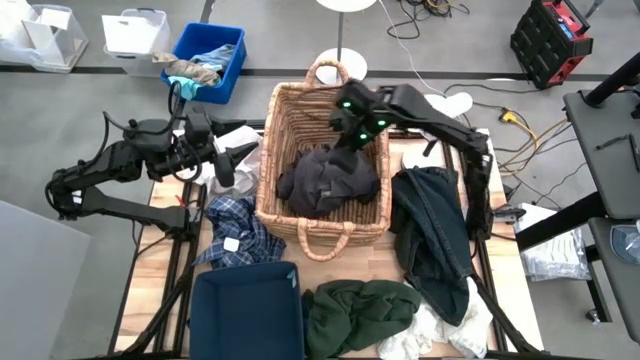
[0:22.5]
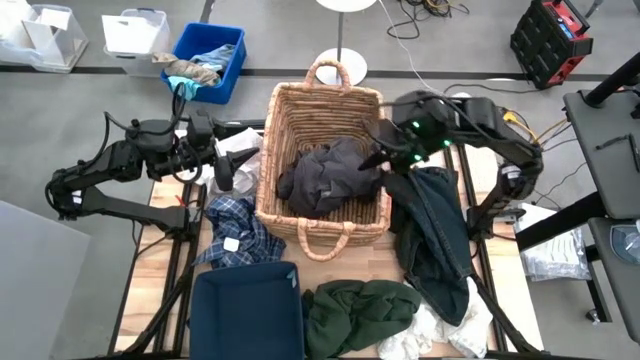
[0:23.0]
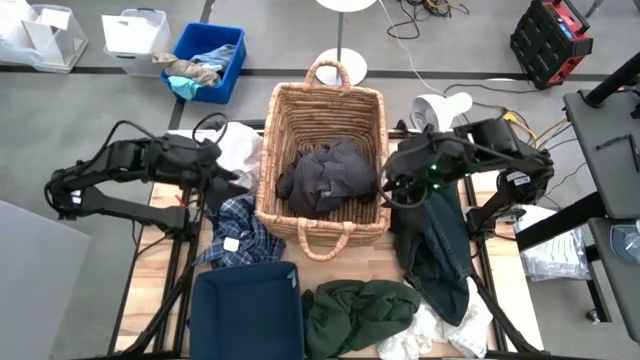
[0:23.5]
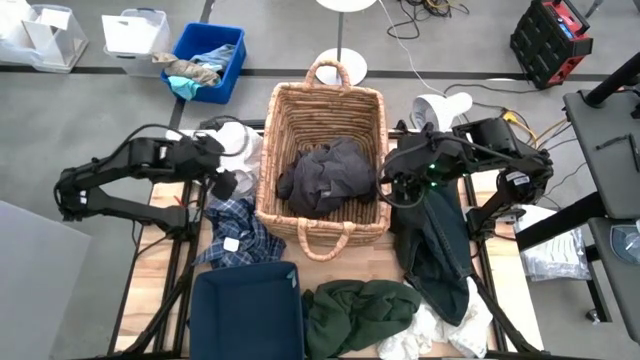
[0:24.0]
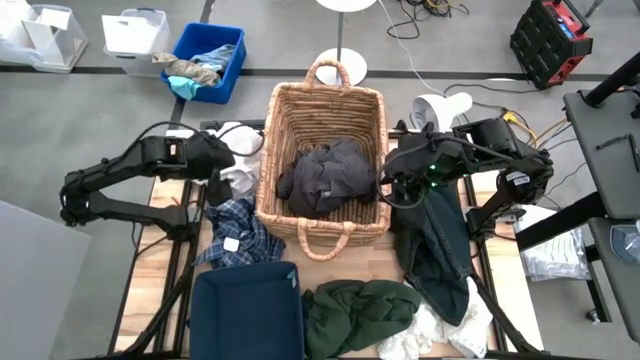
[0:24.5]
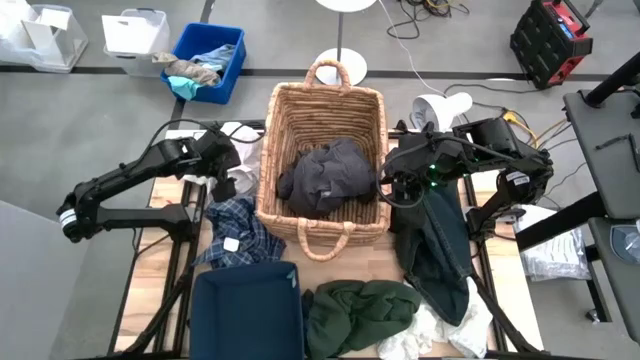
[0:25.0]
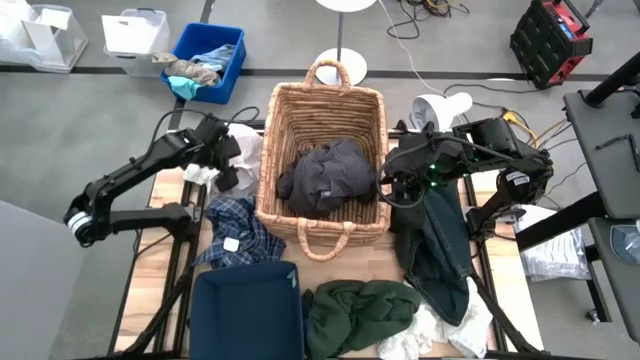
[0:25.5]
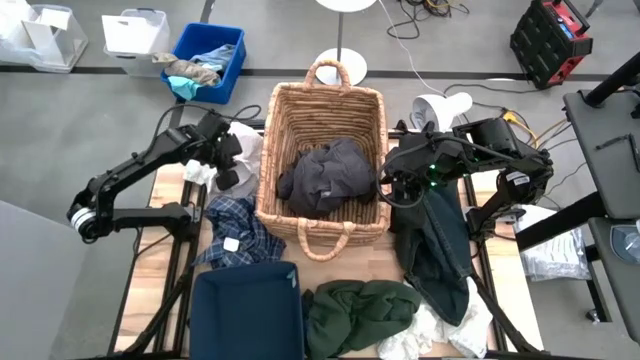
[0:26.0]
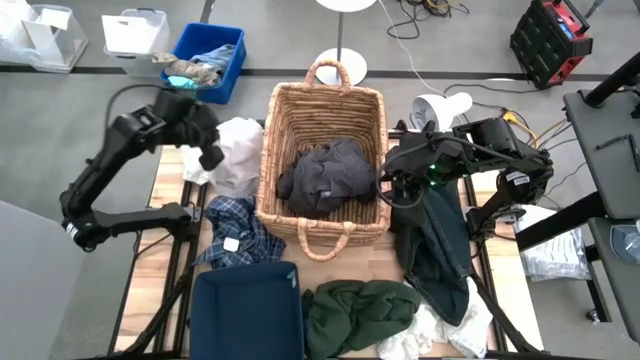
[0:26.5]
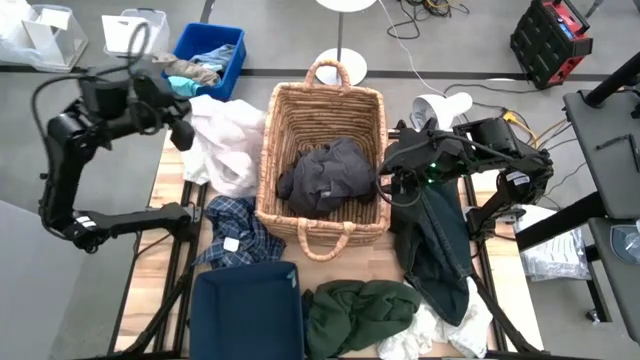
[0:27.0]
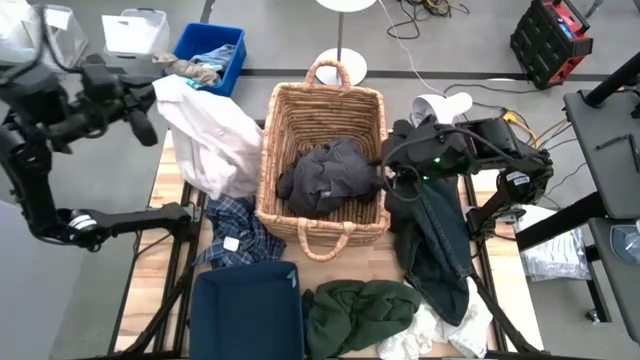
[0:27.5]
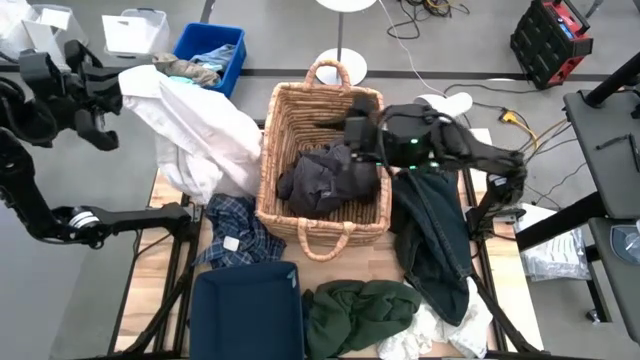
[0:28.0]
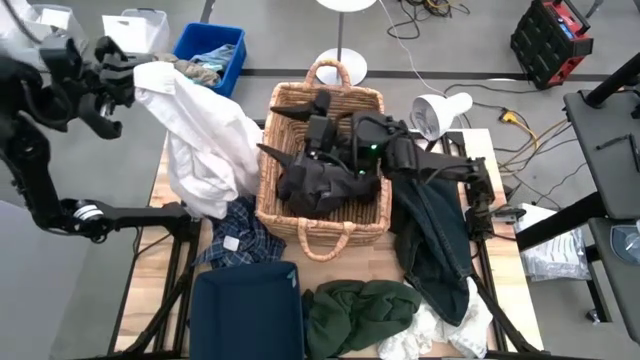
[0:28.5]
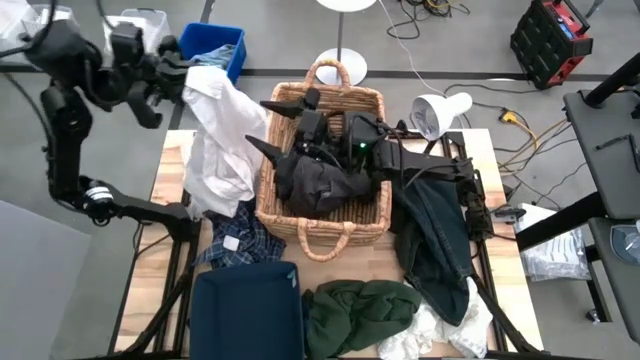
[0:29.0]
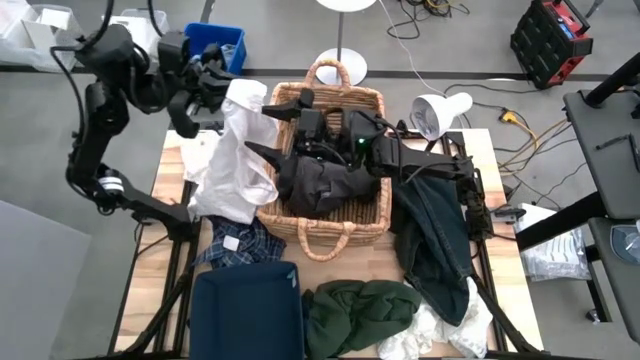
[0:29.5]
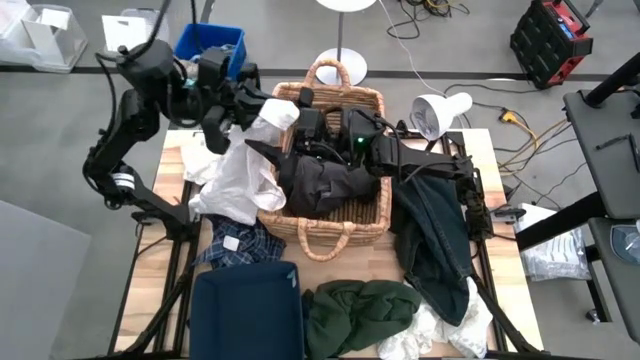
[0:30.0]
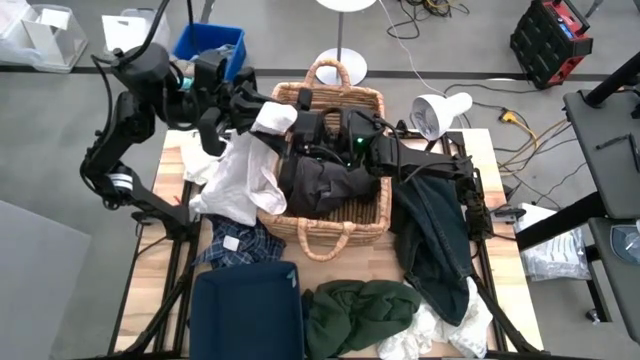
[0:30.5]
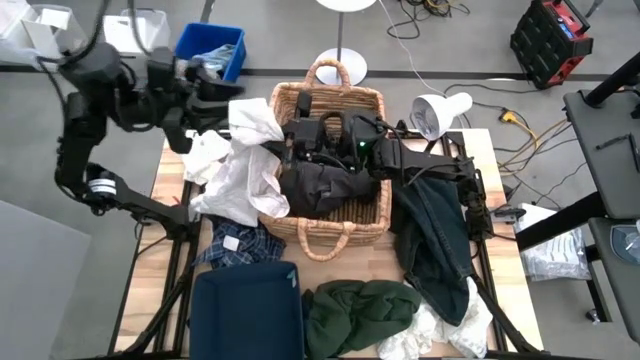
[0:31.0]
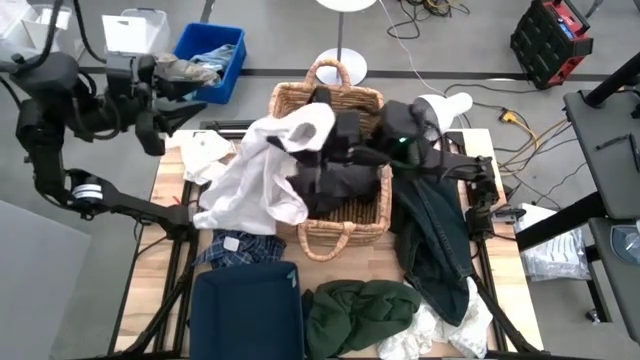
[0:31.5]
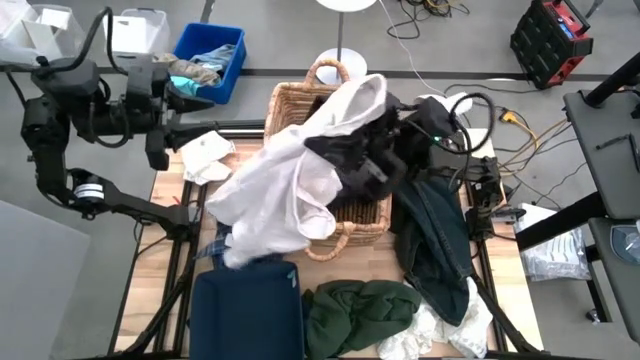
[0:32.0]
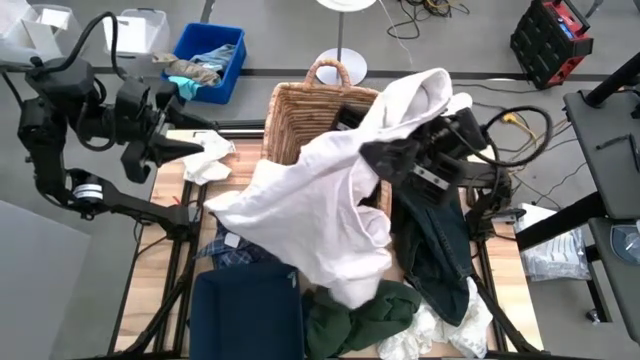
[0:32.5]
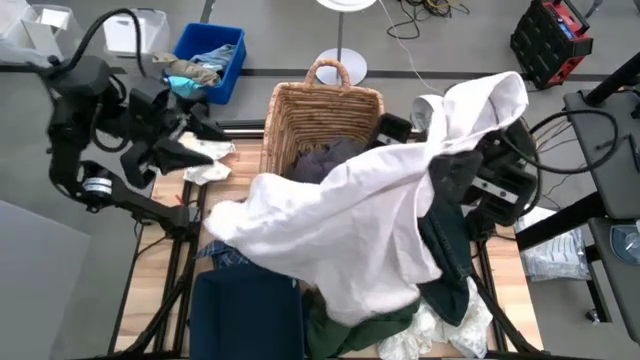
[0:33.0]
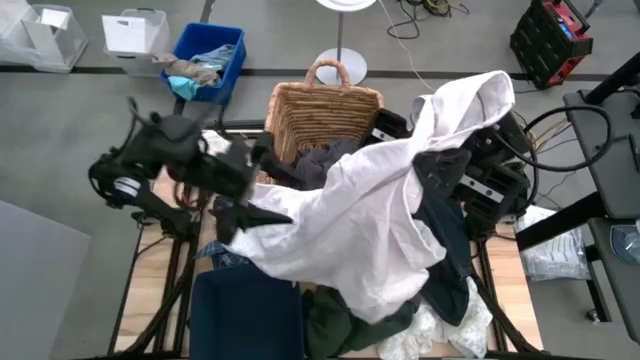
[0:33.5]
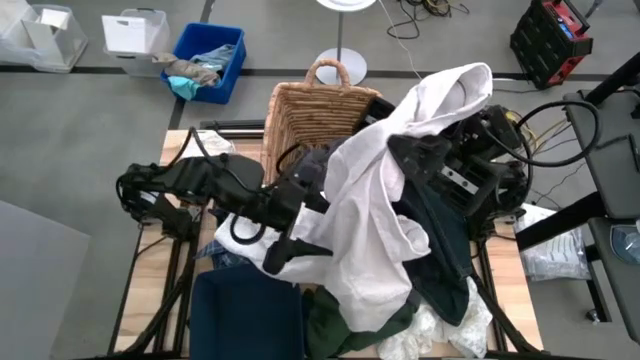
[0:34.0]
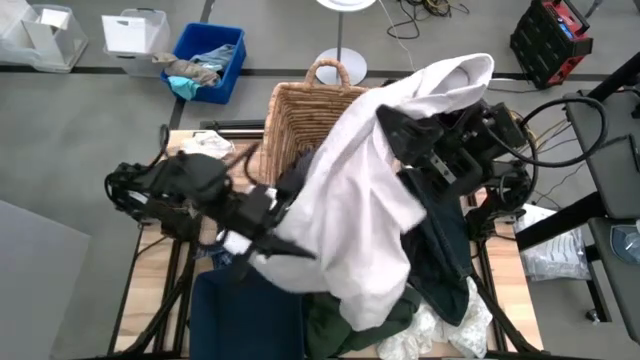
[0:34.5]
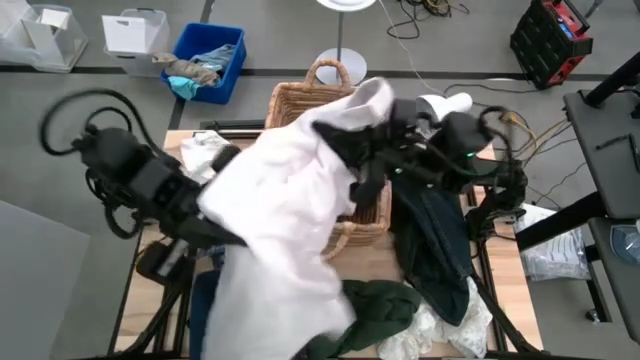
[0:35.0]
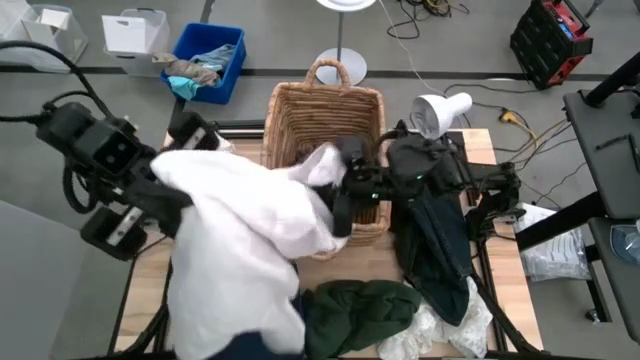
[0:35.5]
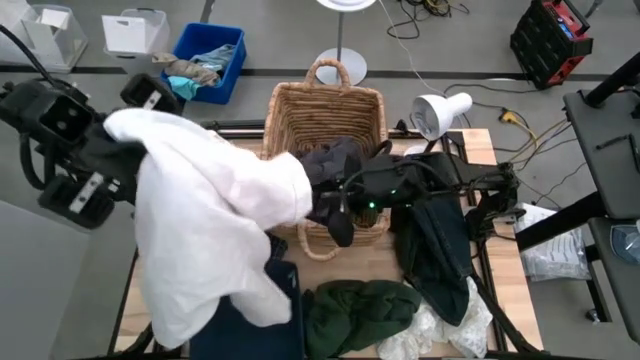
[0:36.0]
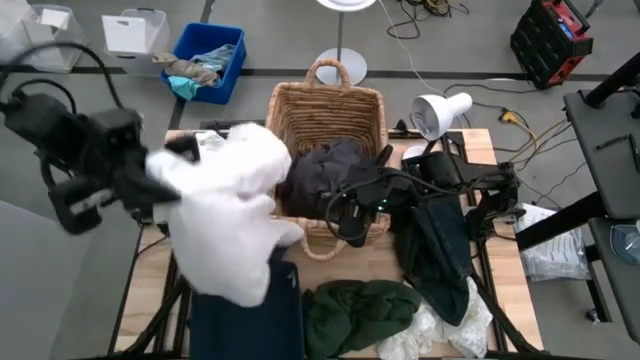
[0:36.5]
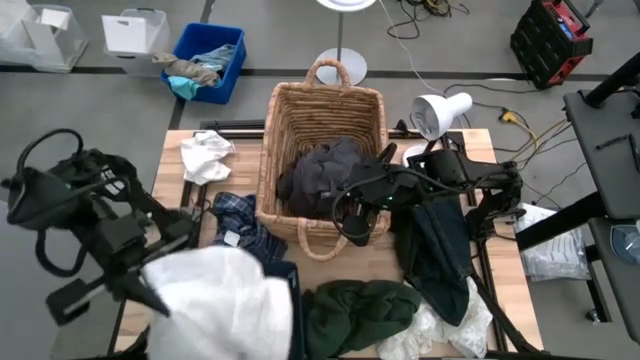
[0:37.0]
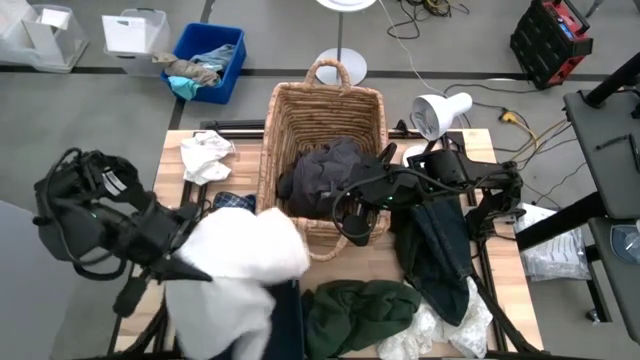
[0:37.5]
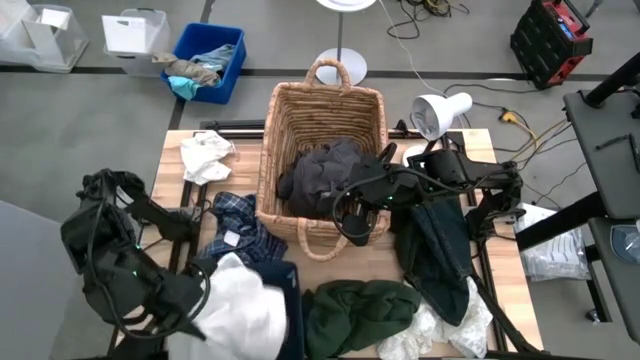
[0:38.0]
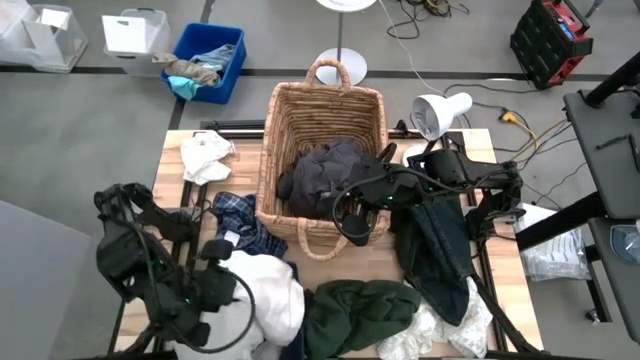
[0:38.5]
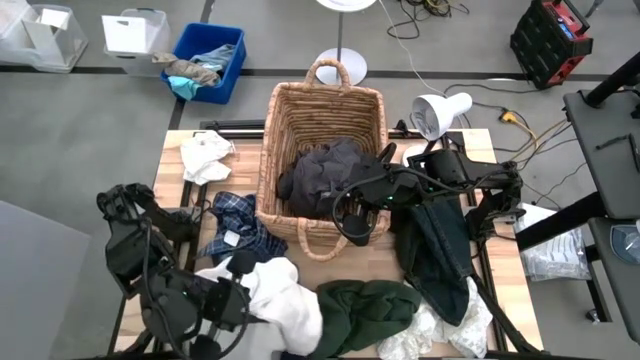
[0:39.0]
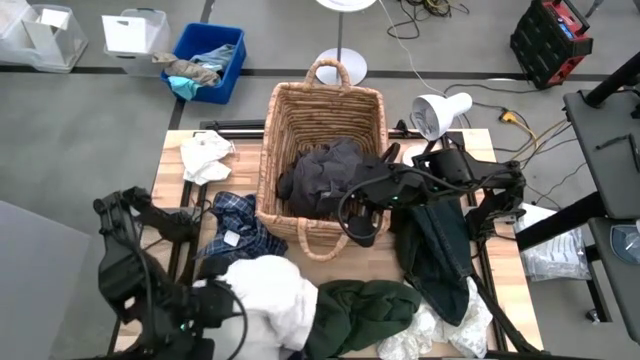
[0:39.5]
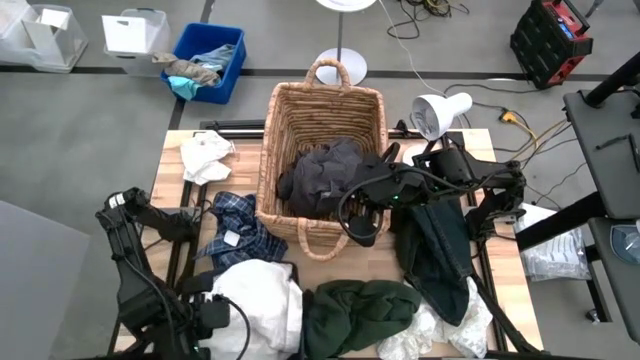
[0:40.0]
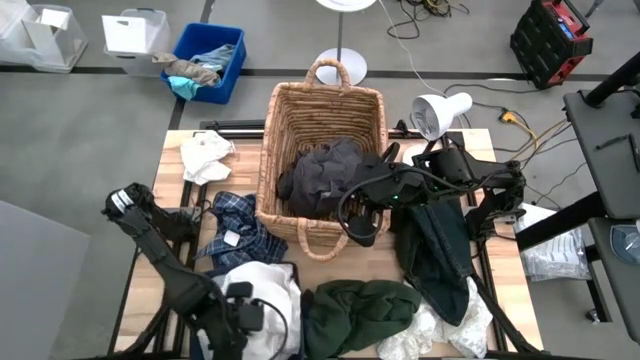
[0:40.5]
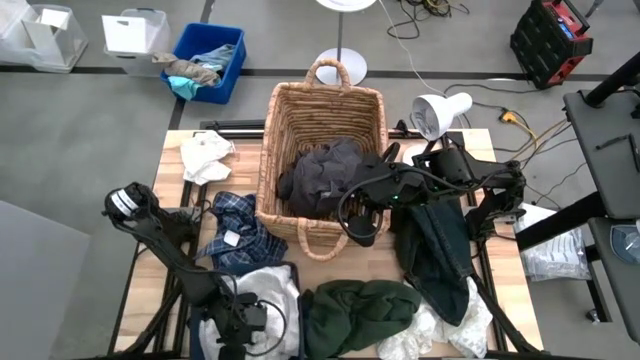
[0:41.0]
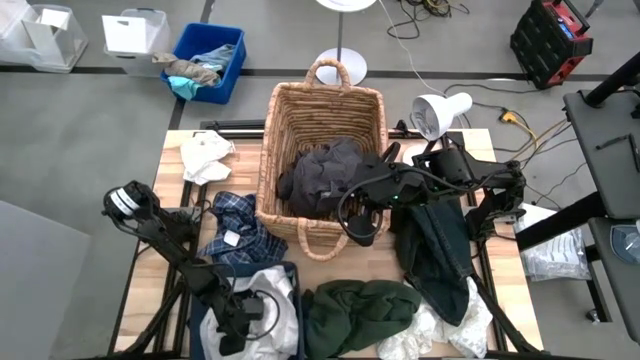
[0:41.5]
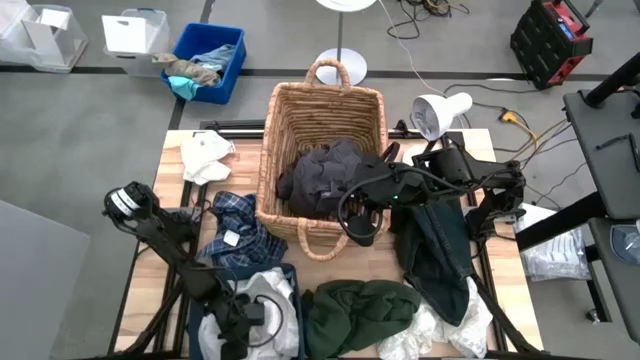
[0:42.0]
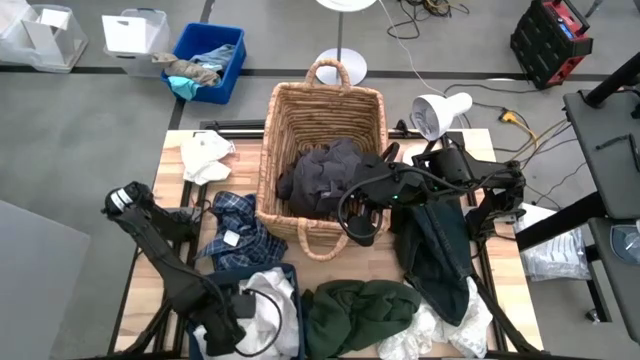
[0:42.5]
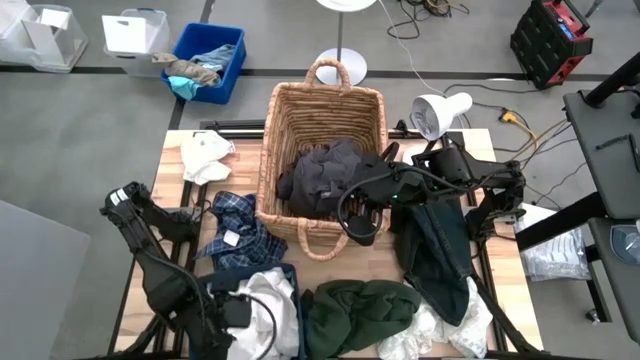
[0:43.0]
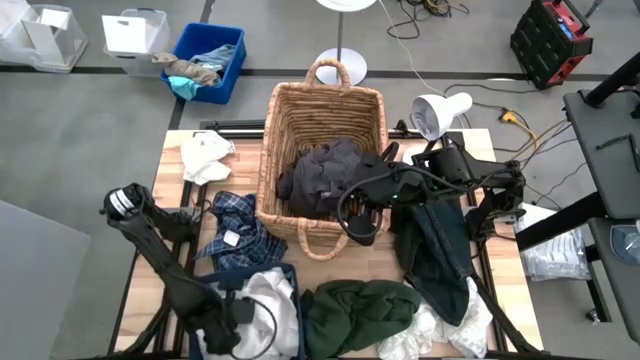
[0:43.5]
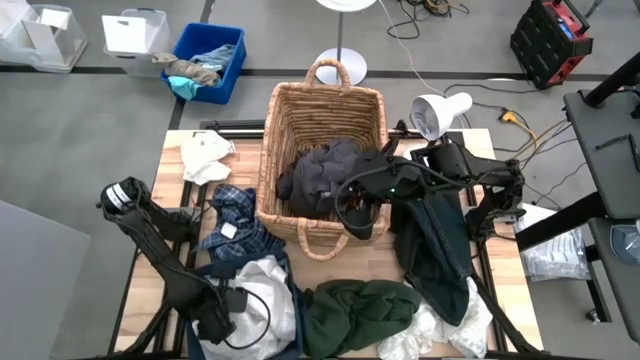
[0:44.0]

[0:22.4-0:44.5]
Task: Sort clothes
Put the white polo shirt into the blue laundry organizer
